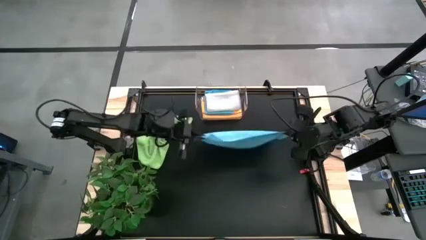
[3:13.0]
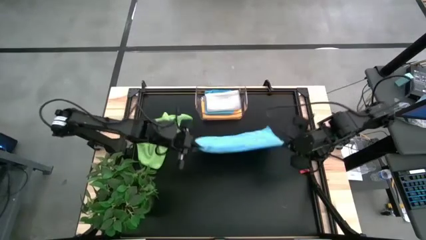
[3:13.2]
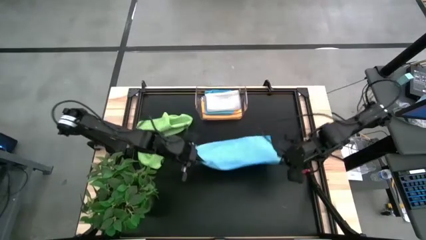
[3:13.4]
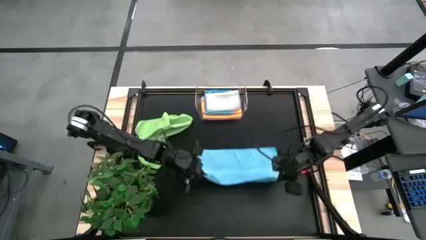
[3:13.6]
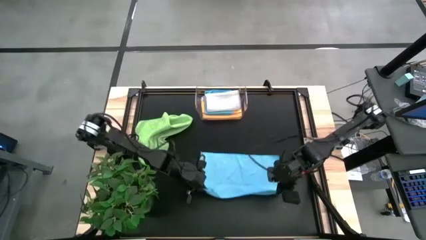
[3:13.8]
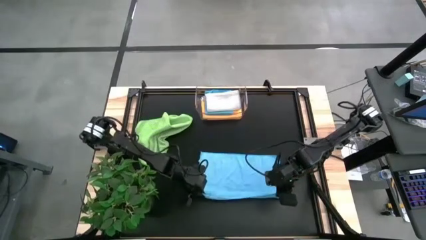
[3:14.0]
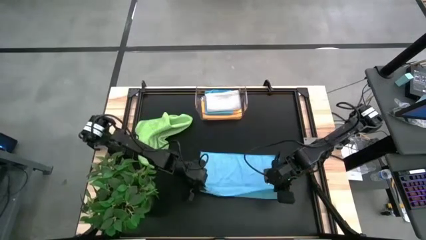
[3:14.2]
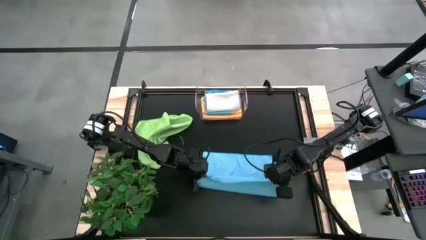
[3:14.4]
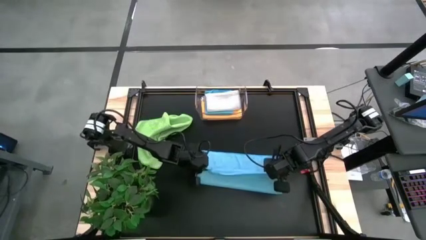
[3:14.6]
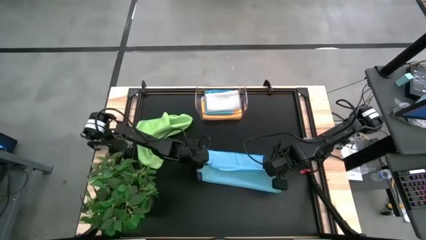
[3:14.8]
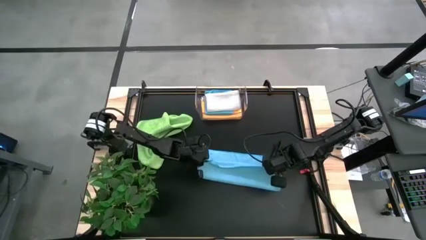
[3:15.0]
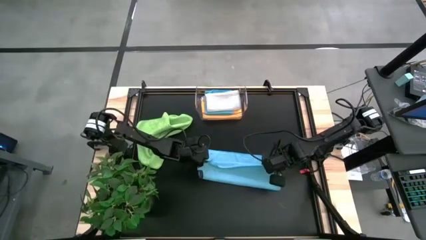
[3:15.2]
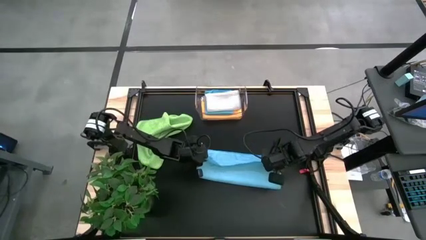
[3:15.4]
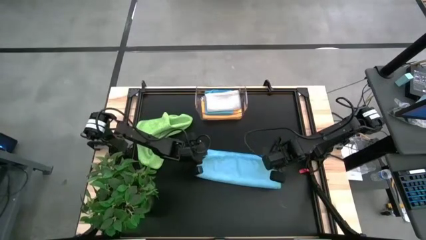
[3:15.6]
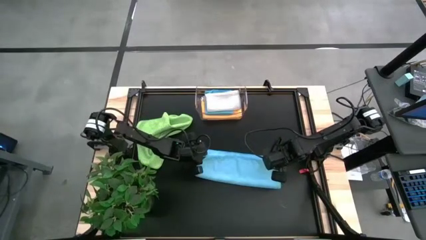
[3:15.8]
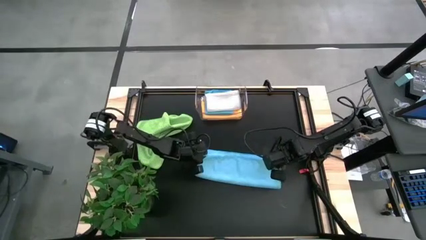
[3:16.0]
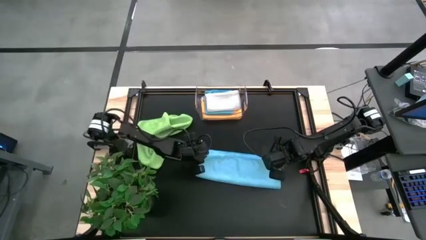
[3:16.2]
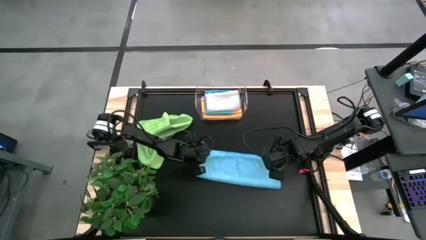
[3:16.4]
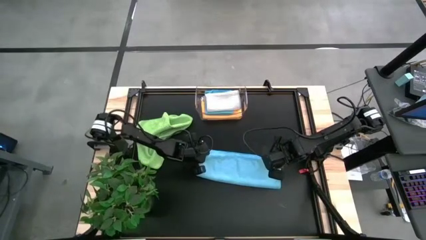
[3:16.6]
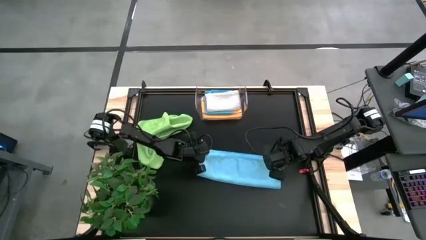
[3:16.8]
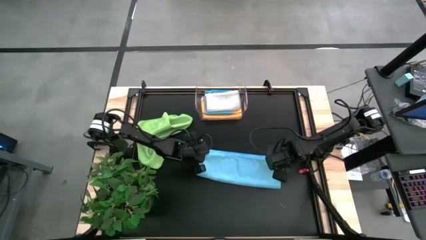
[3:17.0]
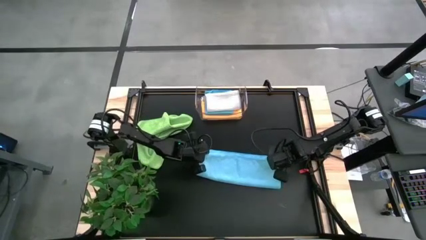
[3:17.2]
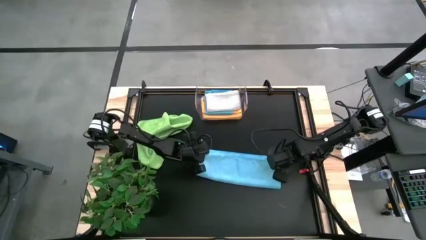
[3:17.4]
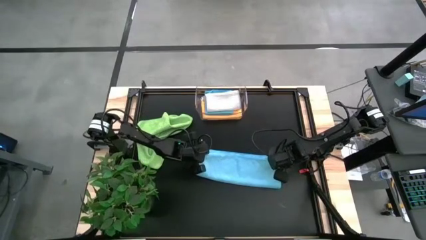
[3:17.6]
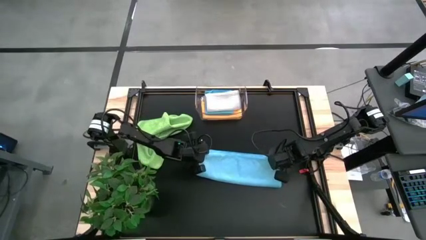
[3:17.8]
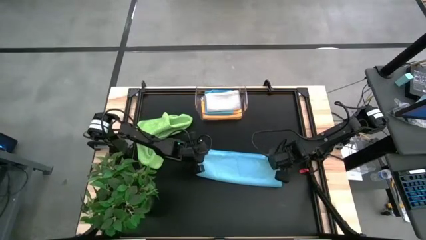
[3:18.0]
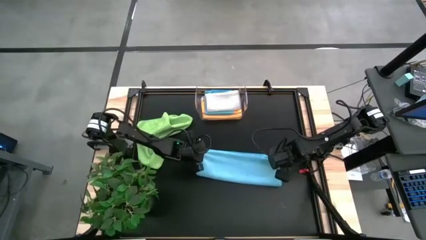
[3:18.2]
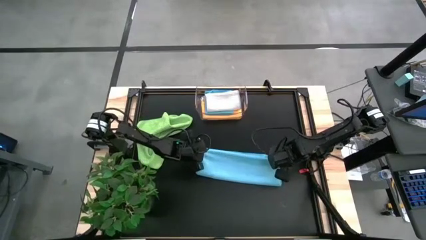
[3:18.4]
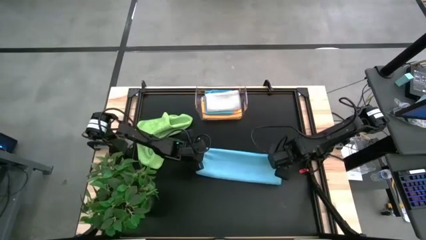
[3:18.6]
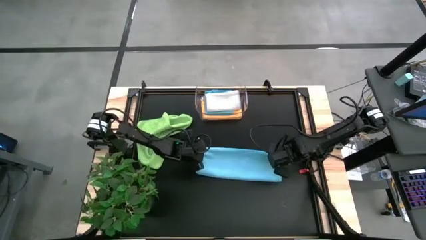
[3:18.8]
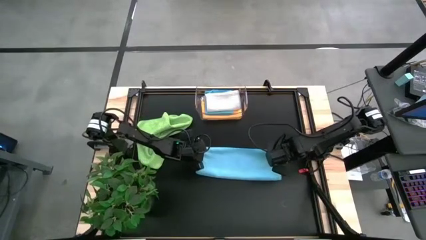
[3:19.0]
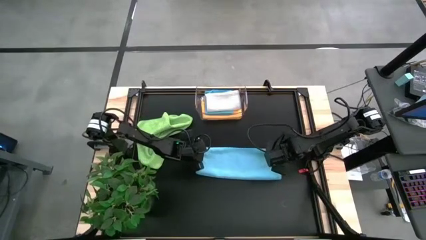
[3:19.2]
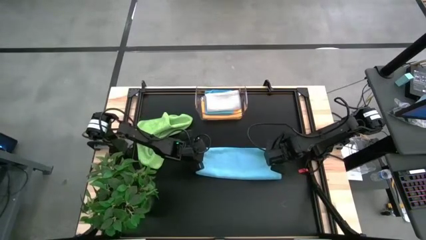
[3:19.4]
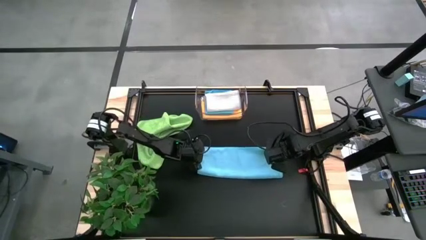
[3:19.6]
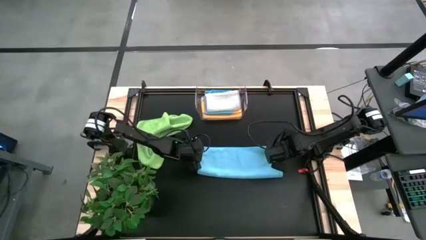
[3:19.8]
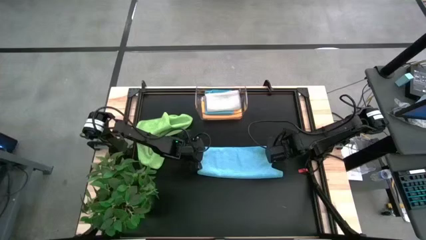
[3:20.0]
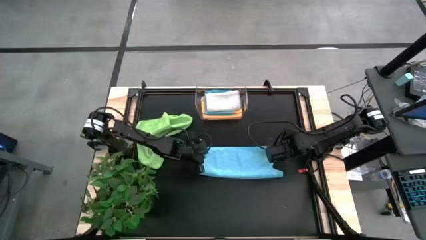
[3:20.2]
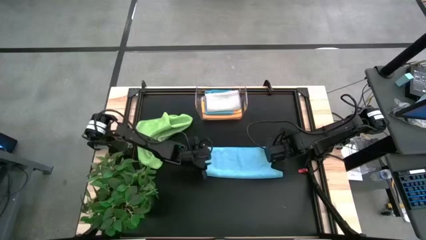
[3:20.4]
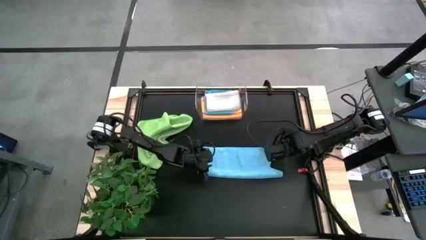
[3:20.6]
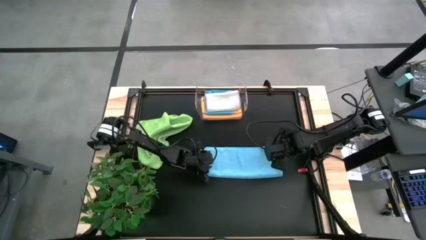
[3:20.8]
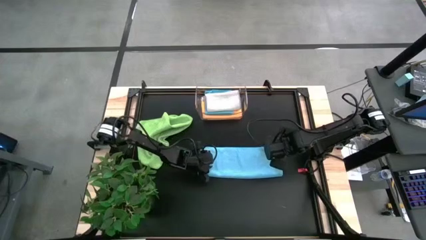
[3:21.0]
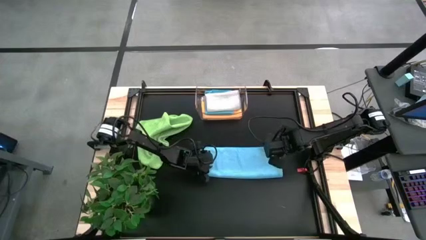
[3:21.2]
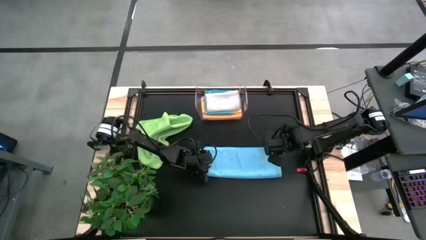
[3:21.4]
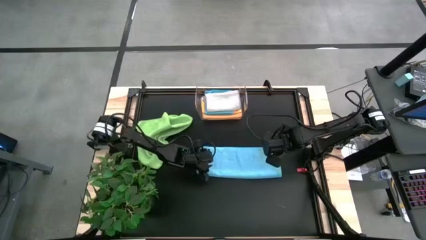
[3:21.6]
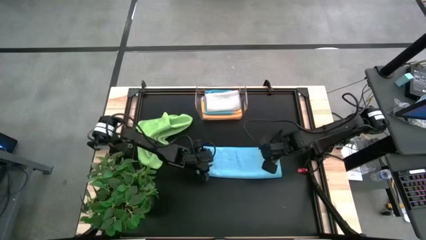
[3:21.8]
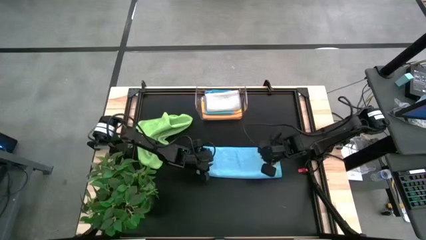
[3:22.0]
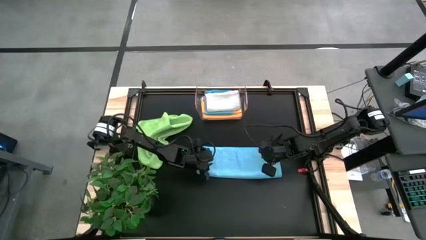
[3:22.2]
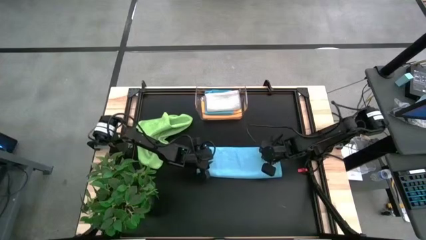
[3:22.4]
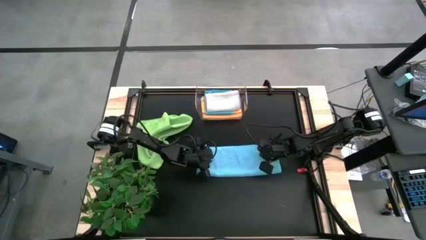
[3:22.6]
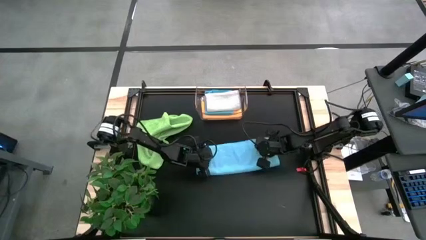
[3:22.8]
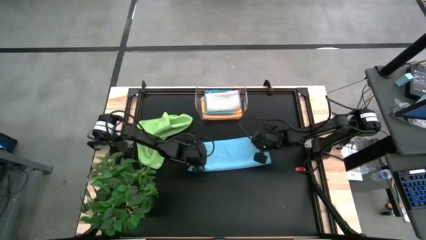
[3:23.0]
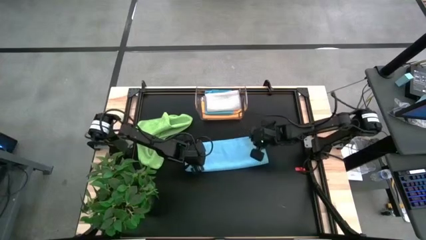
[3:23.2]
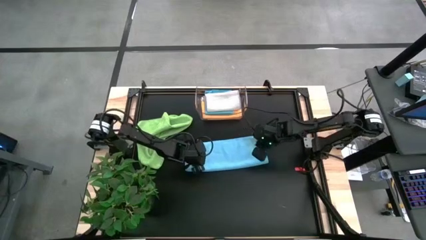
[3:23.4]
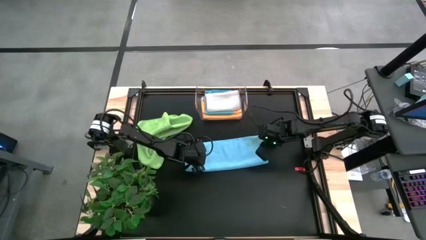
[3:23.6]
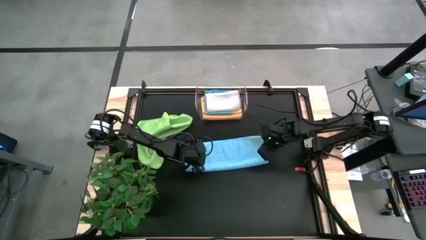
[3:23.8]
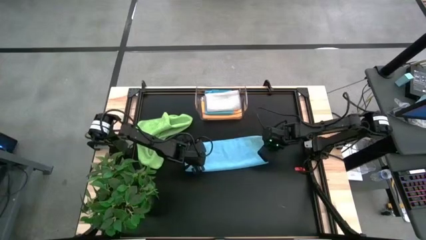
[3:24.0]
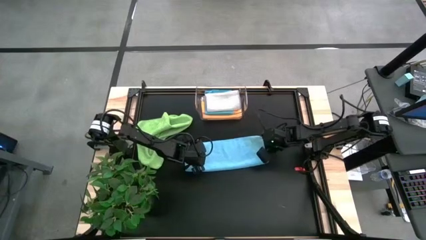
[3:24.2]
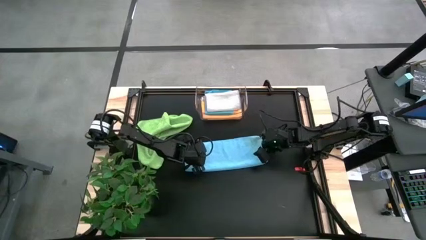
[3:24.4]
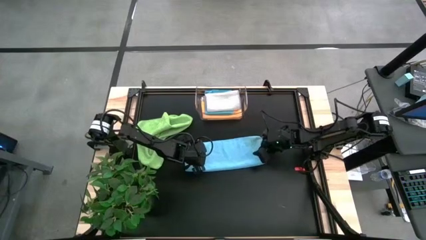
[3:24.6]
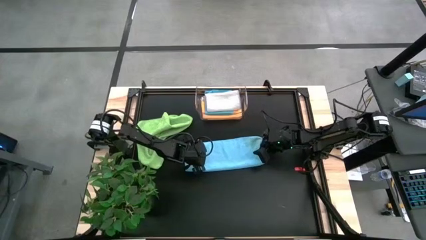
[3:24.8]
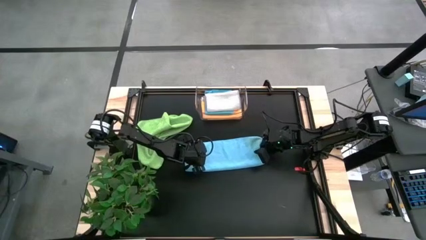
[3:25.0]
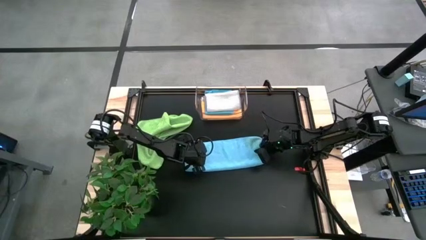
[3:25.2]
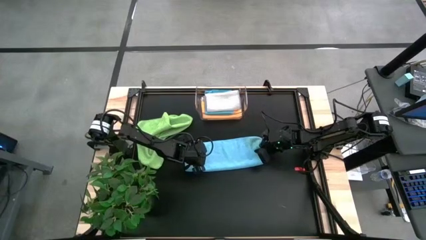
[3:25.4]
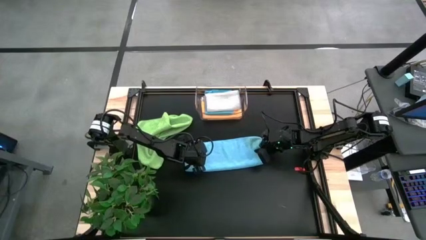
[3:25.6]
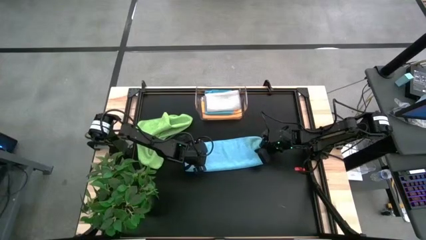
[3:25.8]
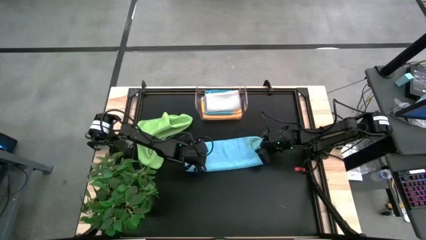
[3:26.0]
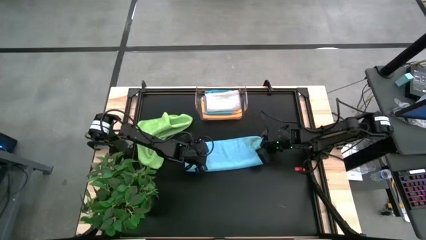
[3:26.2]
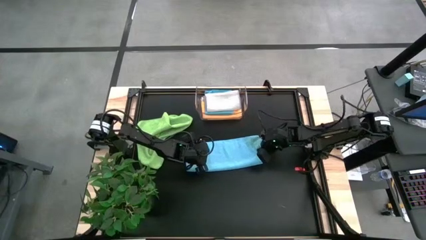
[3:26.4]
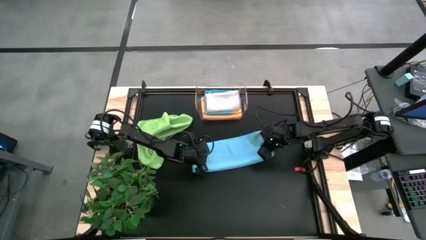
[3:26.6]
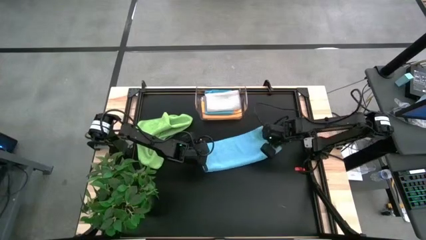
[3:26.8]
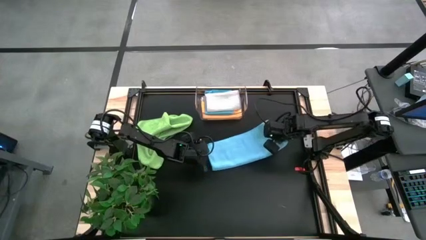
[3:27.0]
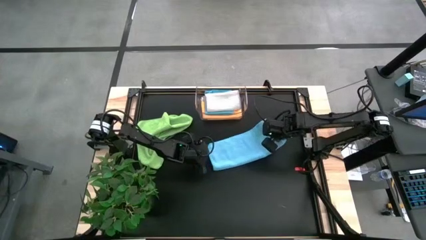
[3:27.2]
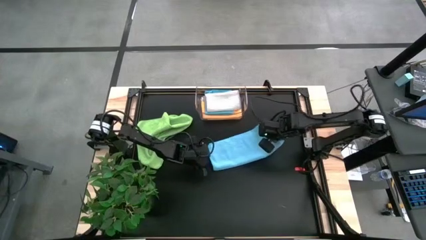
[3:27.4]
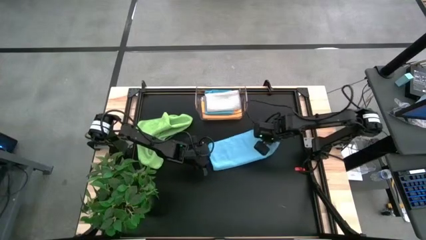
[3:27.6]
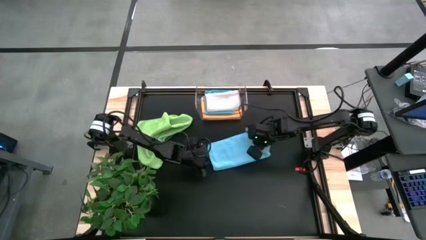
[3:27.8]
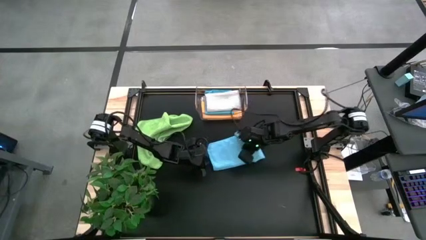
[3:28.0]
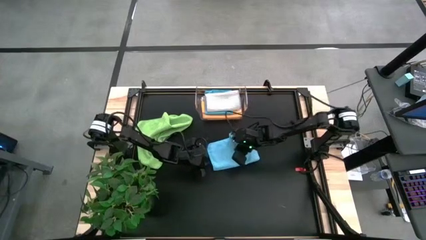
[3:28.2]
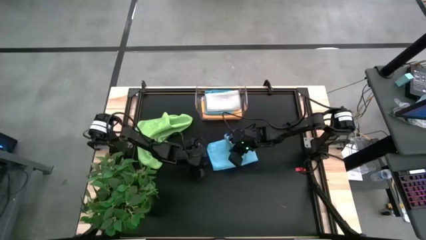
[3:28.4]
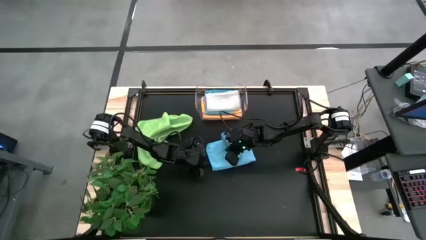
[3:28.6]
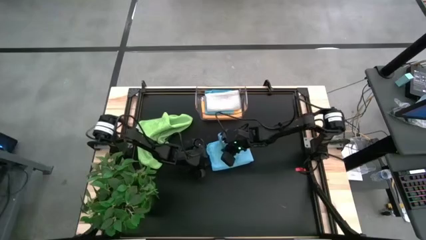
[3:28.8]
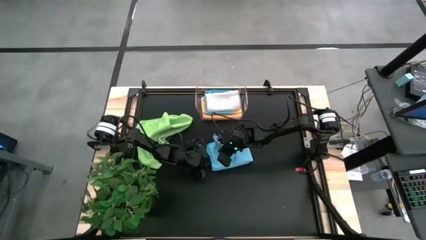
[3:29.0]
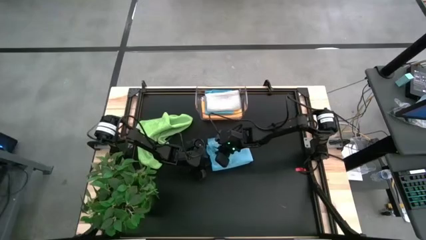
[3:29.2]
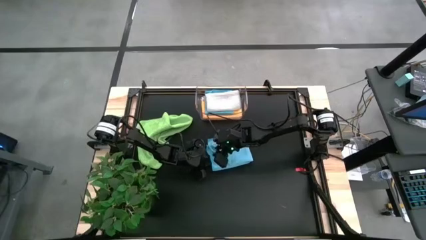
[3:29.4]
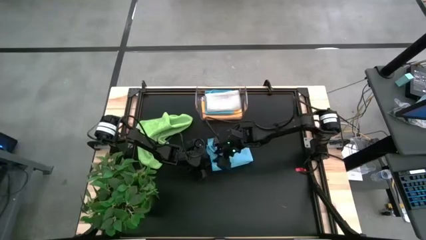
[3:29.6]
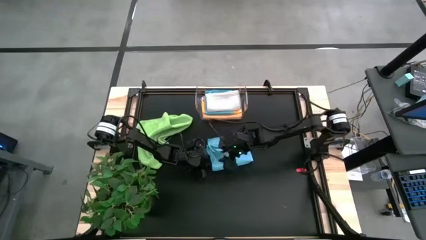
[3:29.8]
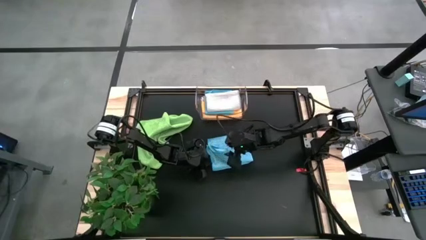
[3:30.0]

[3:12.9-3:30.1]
Task: Fold microfiber towels
Fold the blue microfiber cloth
